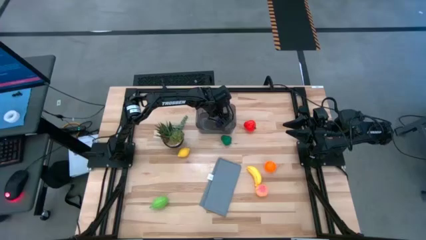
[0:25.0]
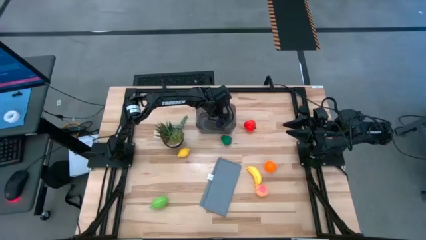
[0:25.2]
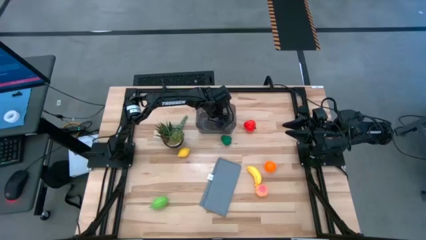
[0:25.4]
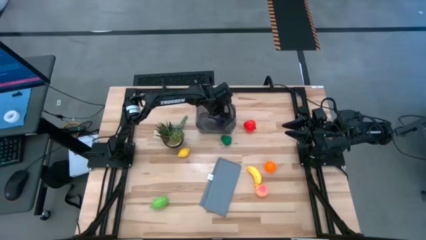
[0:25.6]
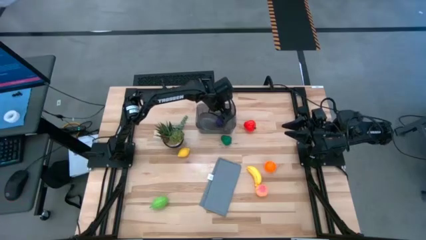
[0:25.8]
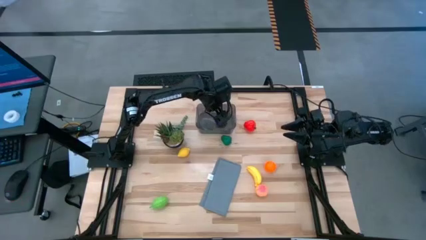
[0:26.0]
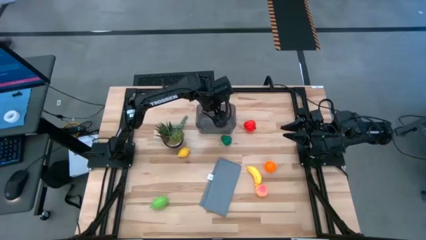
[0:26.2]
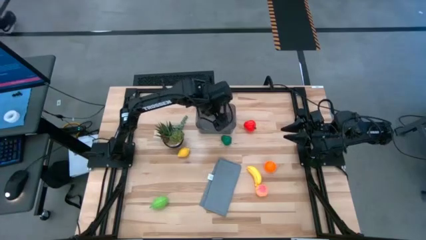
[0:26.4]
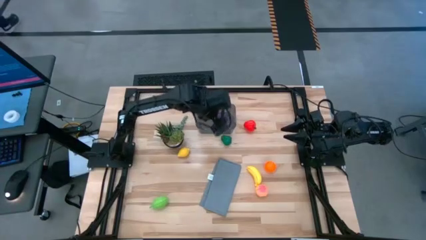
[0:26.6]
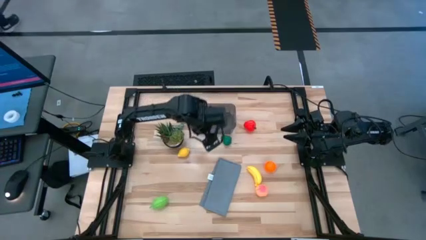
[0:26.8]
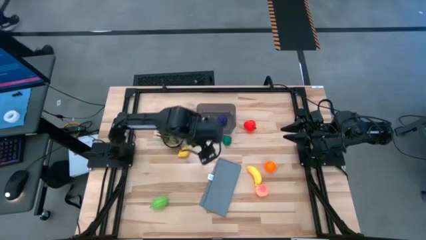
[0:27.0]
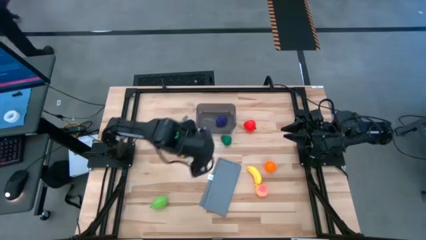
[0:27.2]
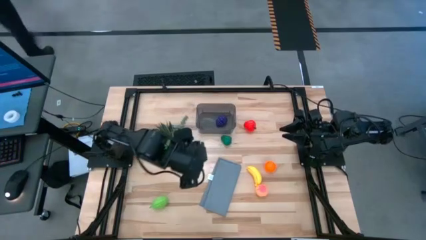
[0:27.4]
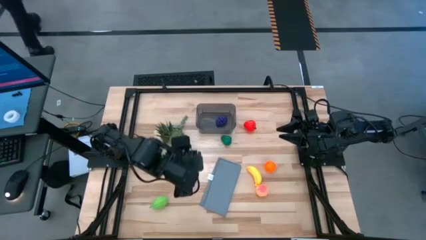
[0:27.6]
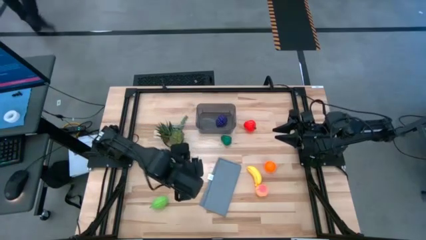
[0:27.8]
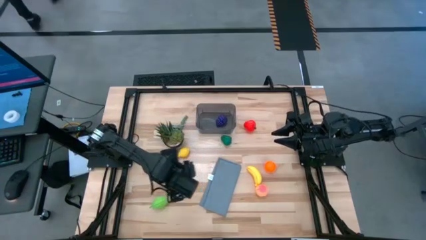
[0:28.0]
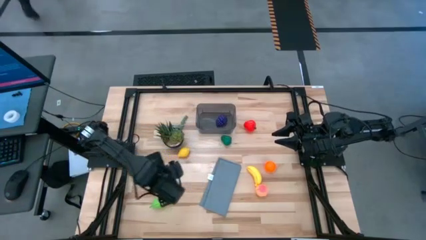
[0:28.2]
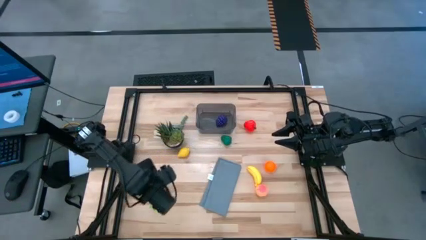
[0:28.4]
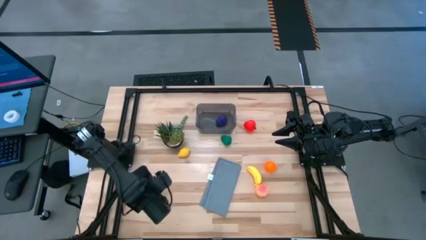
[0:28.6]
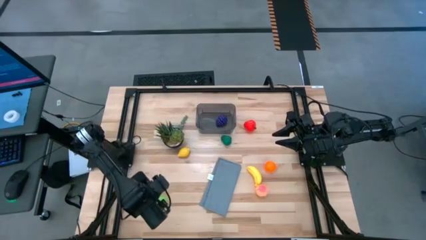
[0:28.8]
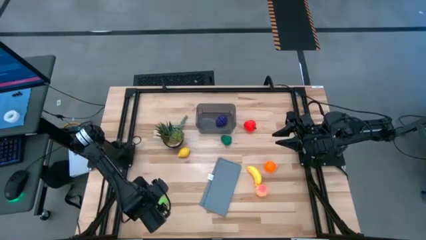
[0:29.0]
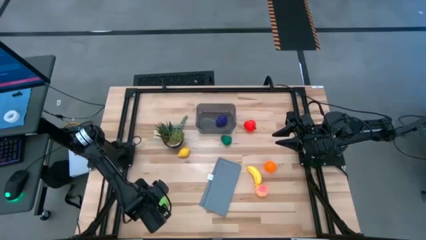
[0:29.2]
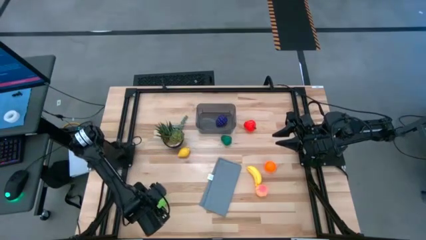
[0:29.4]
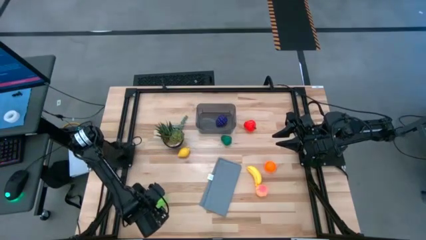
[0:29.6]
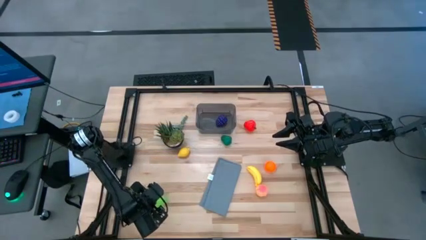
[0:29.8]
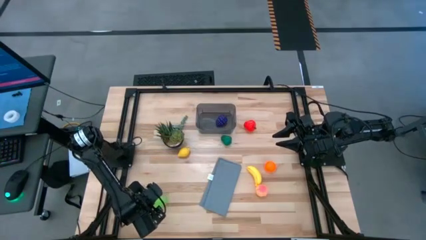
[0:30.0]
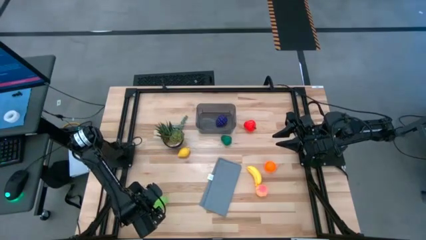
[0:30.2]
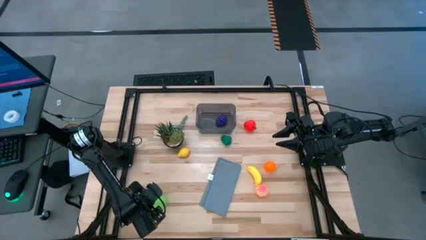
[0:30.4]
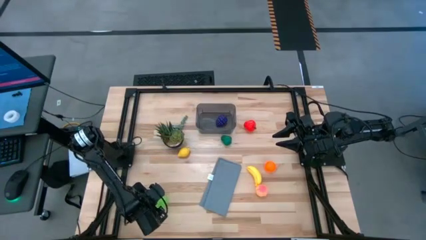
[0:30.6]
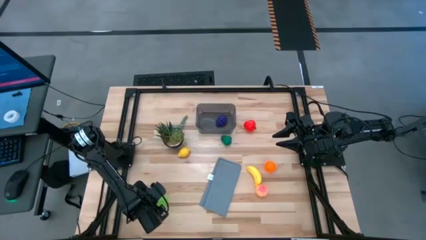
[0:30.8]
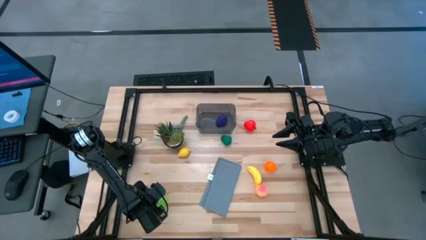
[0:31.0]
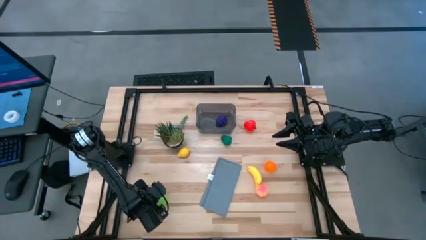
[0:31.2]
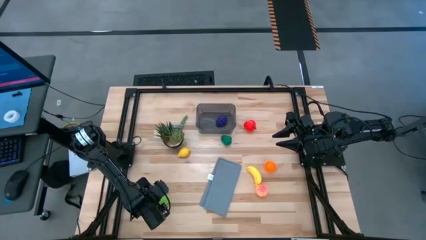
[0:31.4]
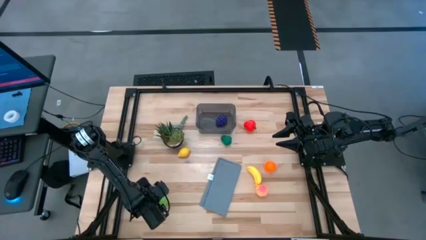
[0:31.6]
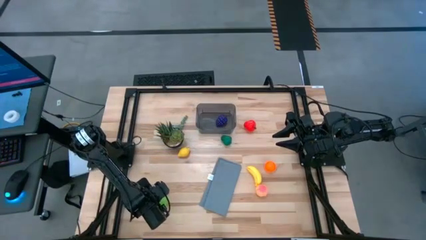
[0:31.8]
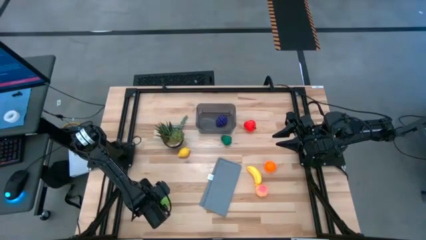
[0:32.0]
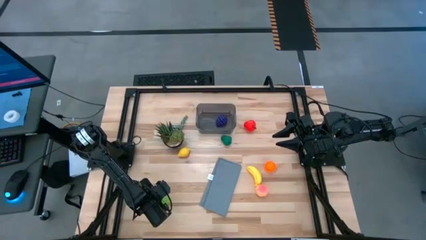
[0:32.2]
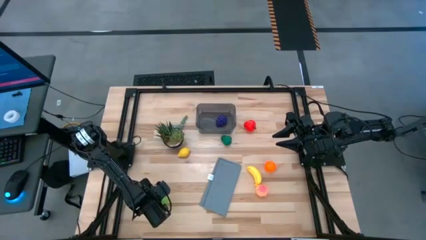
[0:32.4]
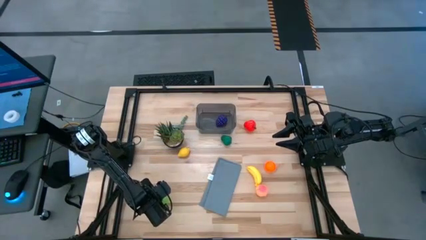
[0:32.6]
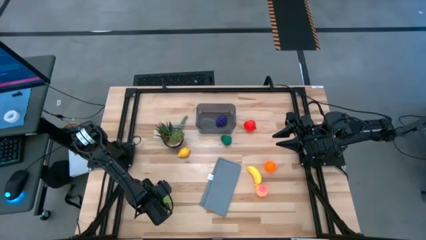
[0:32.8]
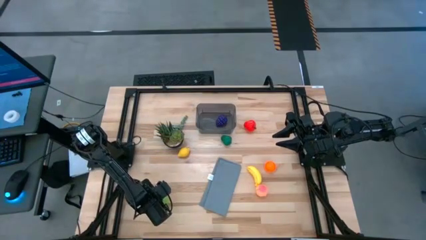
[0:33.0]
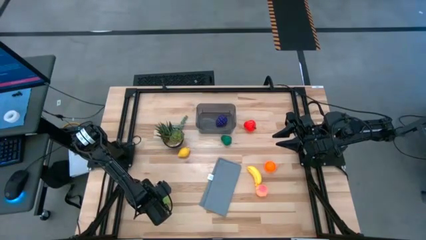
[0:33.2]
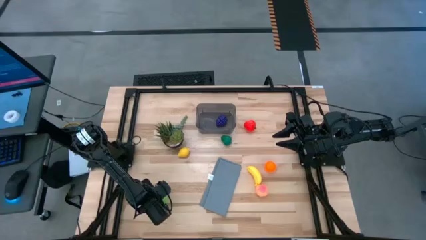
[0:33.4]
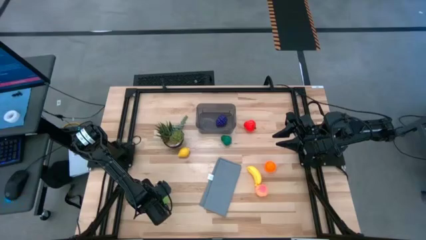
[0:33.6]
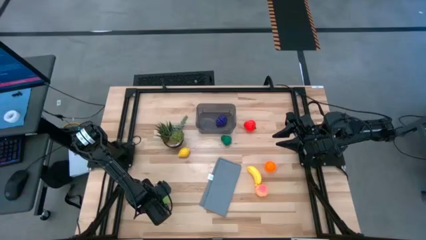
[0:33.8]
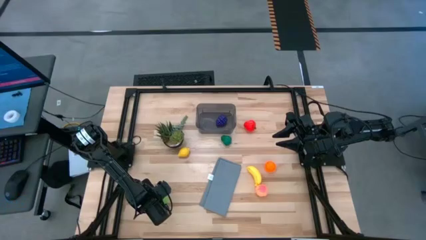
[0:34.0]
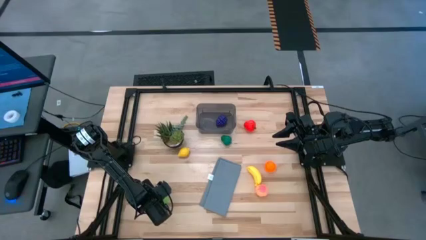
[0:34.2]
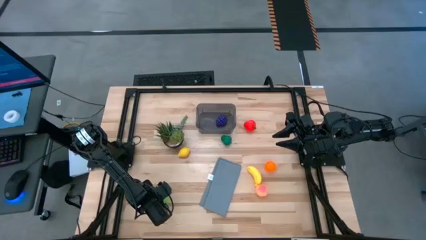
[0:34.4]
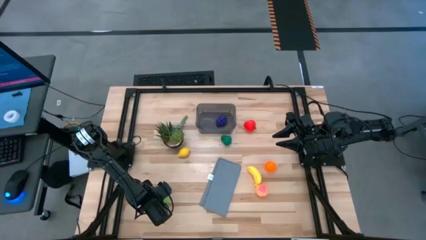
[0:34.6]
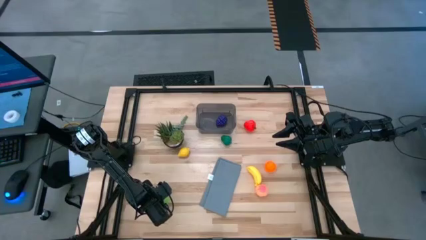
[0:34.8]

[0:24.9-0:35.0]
Task: Pick and placing Produce into tupperware
Put the melon into the black bin
